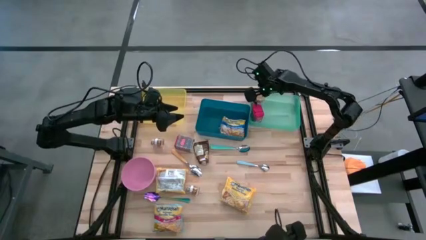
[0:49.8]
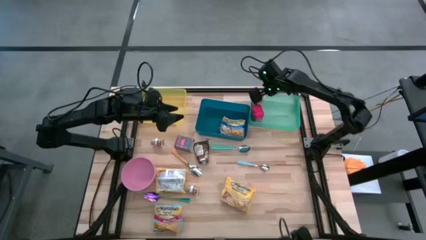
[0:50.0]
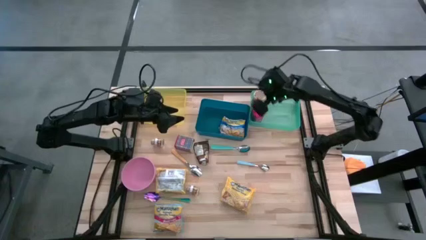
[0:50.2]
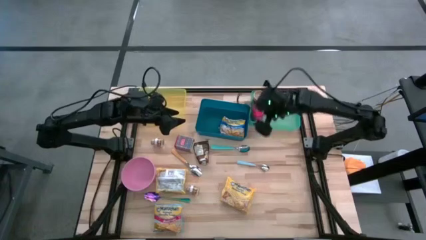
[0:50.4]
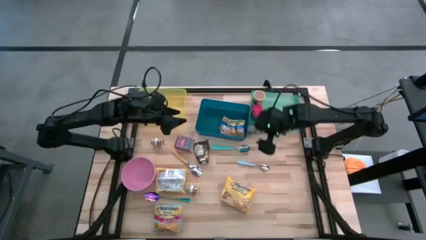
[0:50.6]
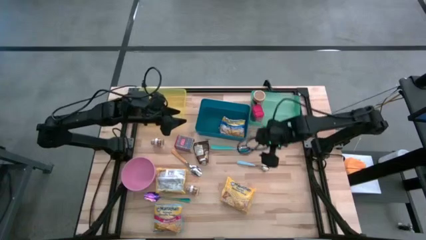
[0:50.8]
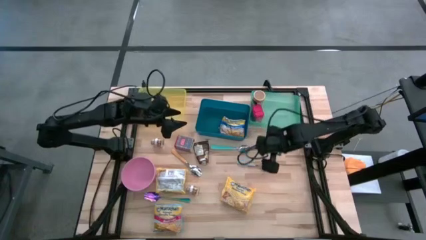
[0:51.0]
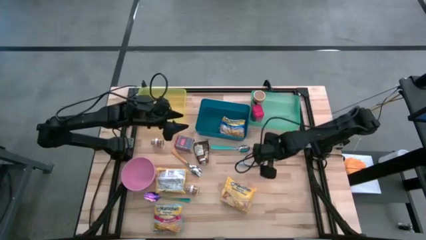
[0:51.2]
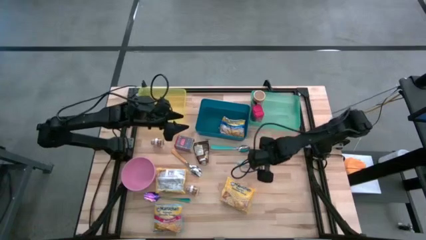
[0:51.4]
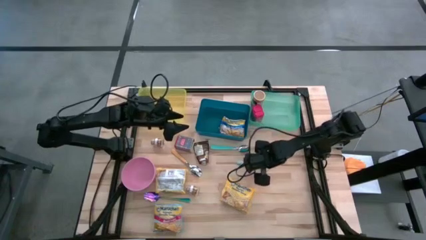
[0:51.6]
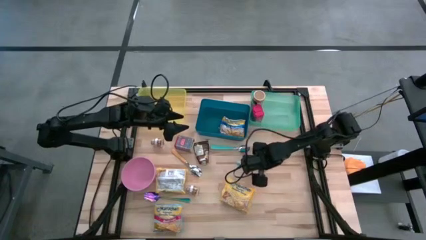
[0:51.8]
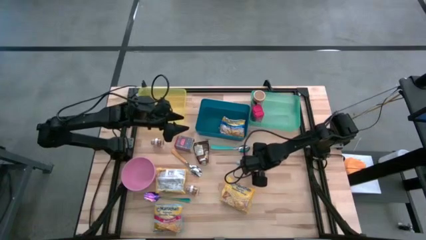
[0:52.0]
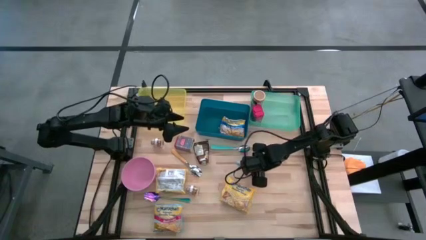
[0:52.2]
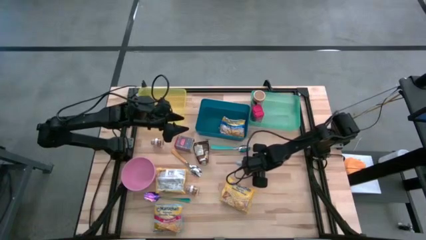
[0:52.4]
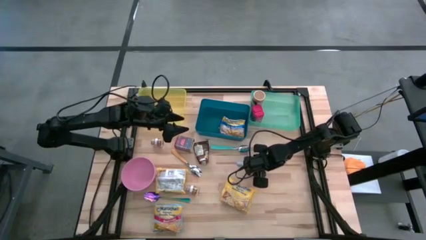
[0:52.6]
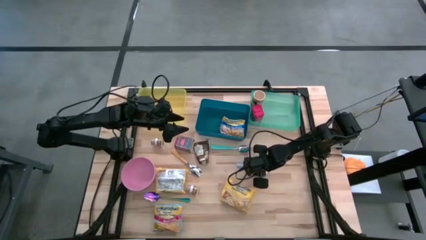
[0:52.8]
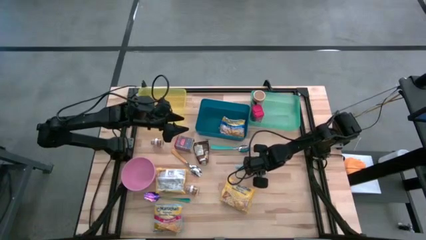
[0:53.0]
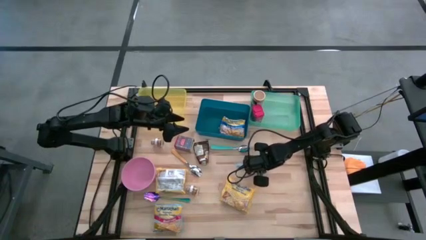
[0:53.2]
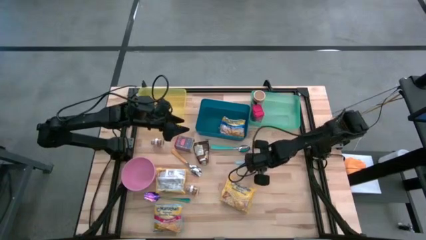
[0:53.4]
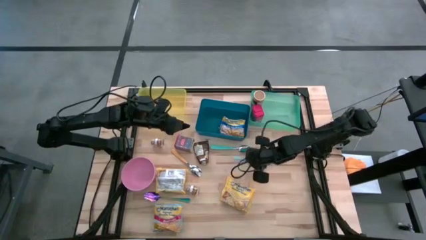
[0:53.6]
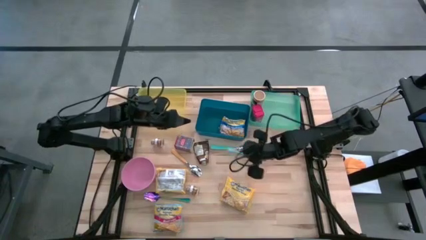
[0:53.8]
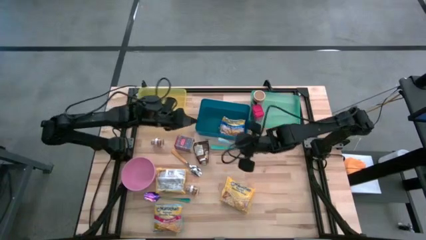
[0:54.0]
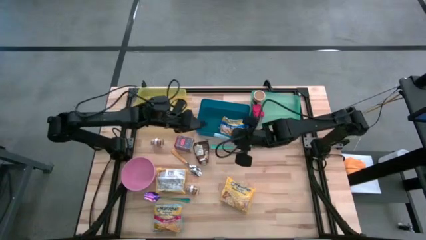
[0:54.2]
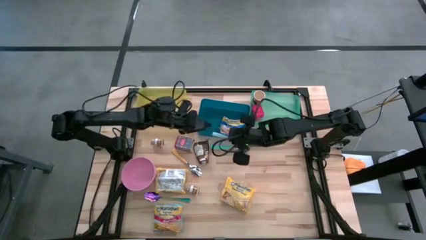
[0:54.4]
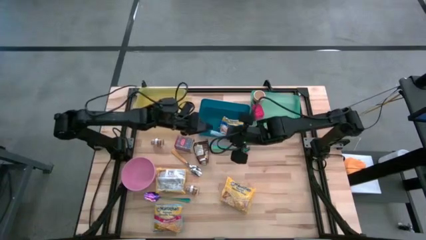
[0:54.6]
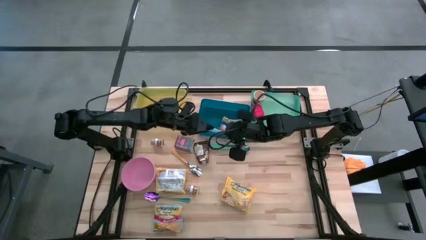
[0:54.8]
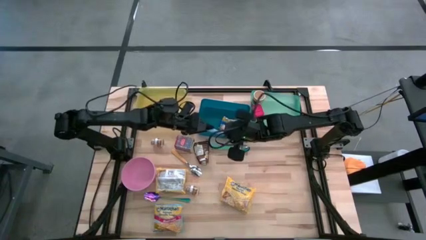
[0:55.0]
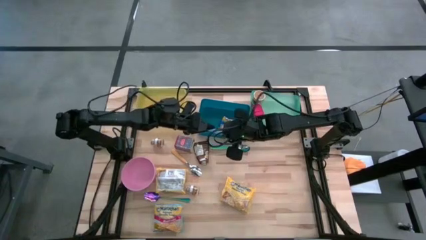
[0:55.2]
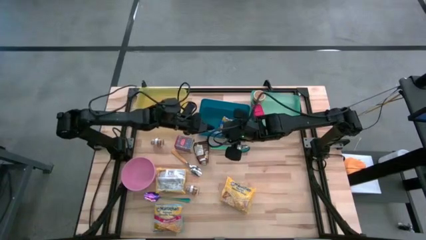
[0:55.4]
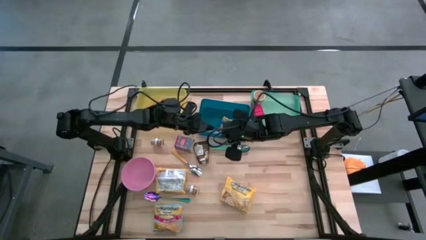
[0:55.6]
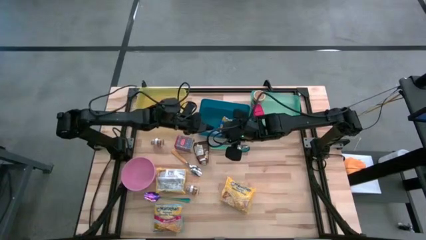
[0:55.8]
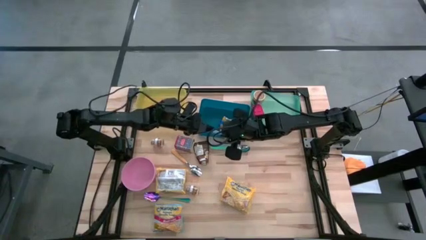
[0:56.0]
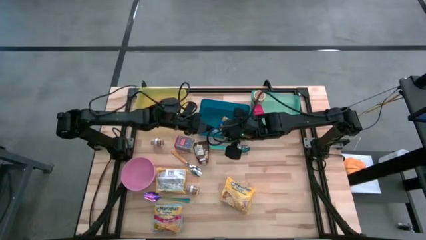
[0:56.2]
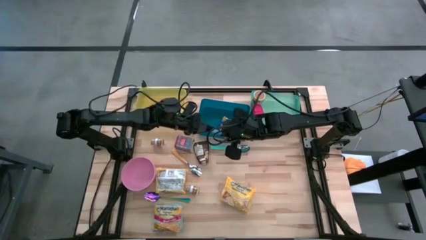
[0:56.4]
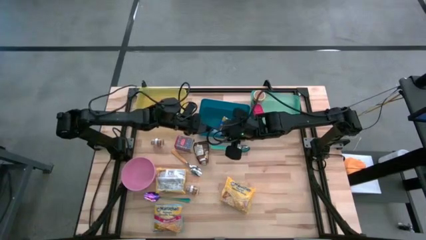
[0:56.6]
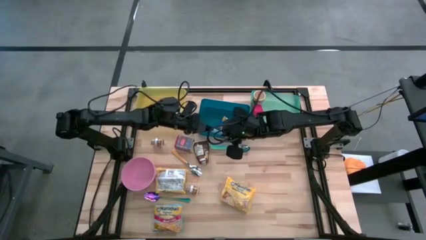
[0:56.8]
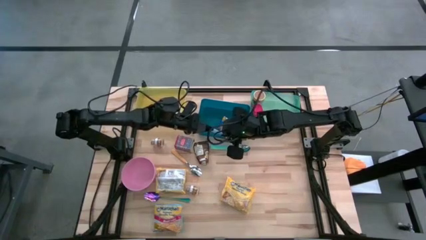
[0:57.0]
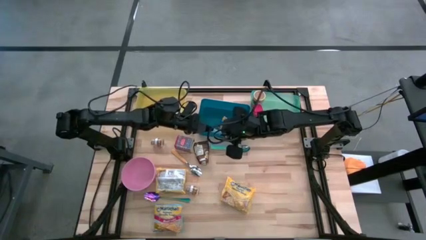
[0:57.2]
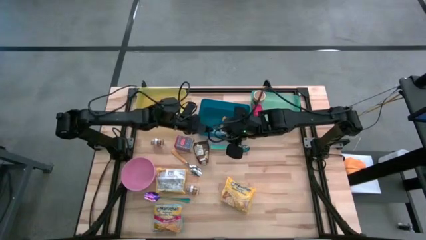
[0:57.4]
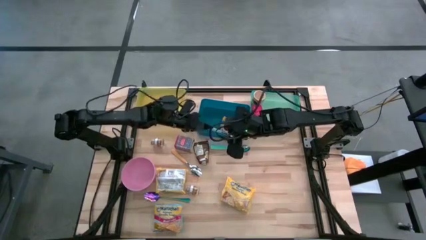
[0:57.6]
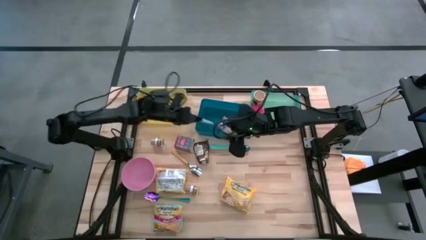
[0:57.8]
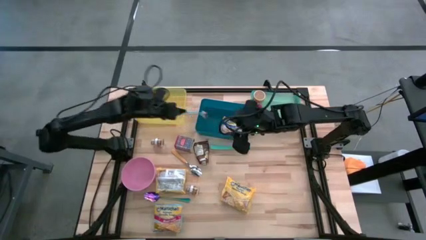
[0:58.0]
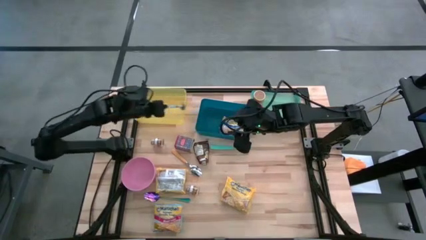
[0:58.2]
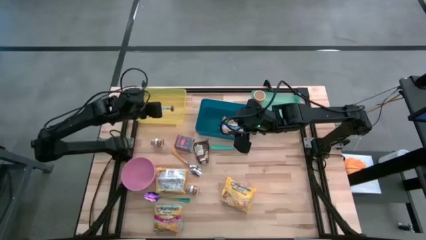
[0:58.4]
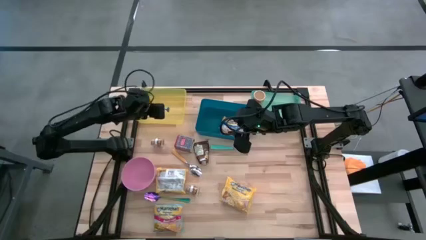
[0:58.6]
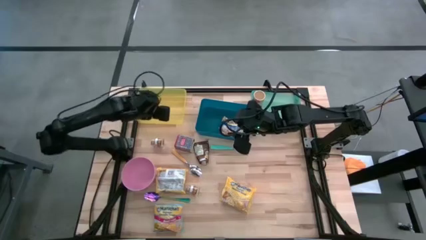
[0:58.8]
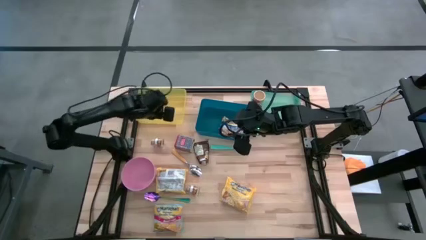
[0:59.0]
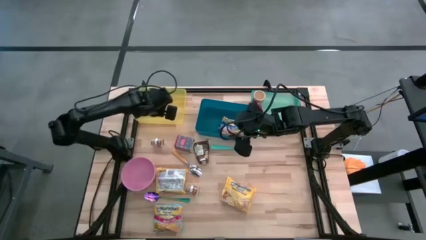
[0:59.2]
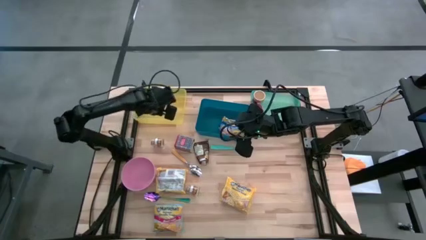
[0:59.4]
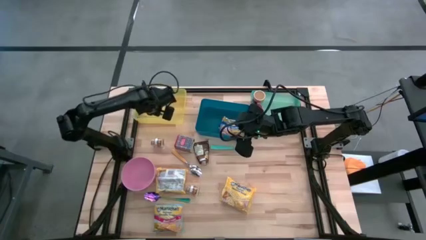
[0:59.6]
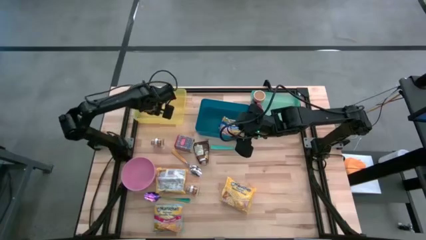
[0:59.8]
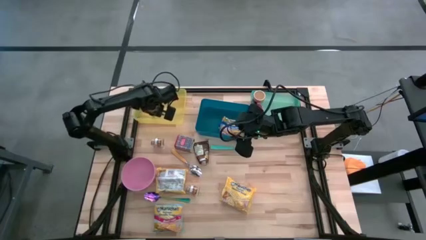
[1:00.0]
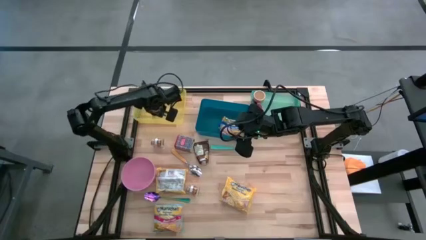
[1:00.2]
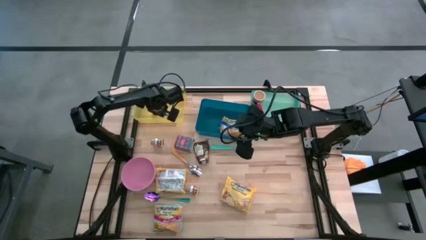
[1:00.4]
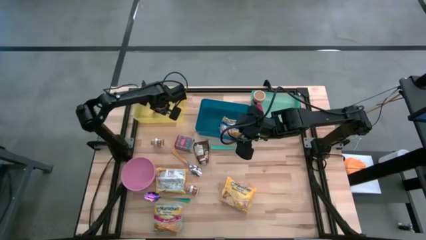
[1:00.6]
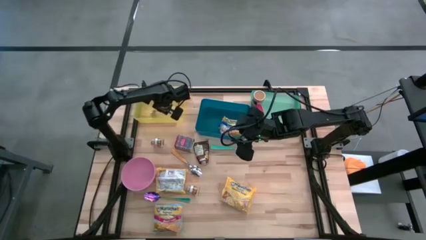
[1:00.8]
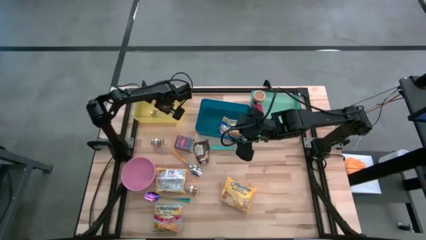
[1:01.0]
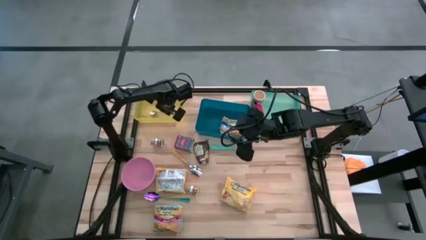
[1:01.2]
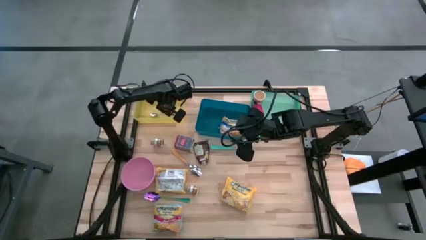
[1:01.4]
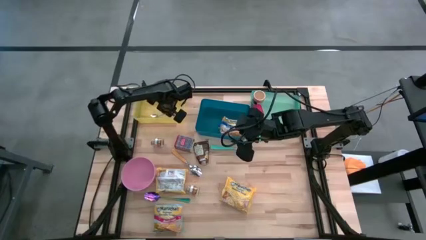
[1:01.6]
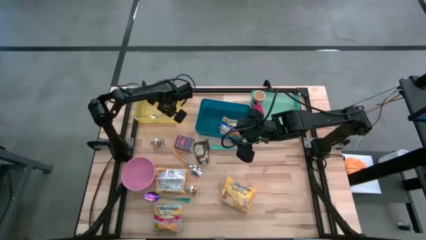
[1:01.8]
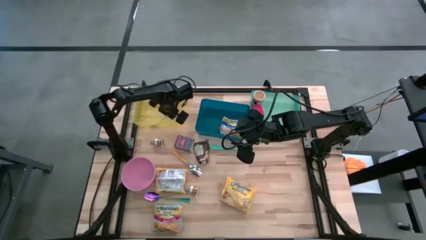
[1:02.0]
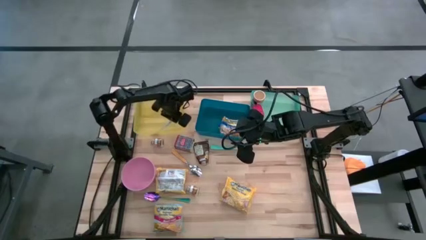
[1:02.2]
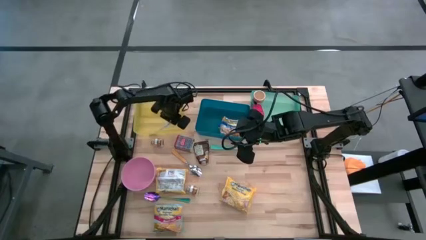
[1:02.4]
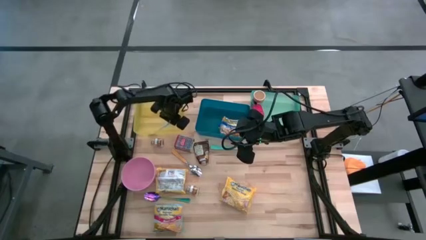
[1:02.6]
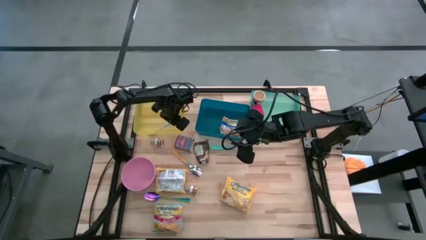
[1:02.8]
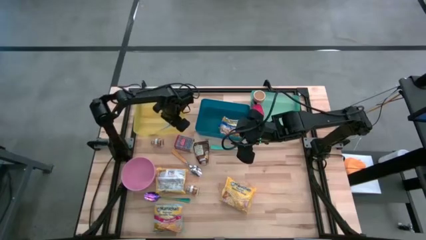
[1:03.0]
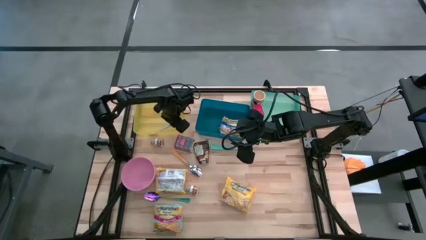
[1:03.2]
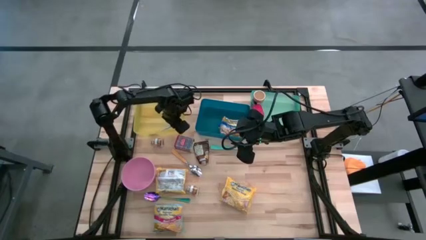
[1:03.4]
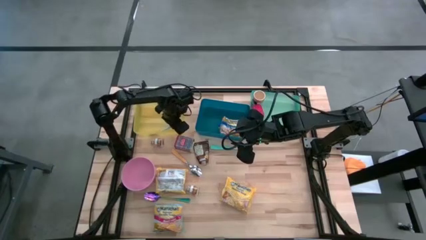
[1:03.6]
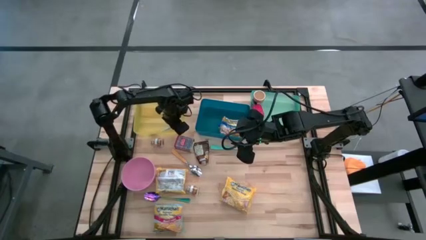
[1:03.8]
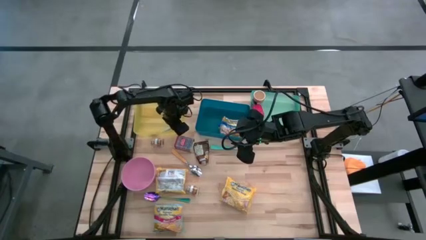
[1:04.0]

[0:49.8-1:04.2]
Put the light blue spoon into the yellow transparent bin
